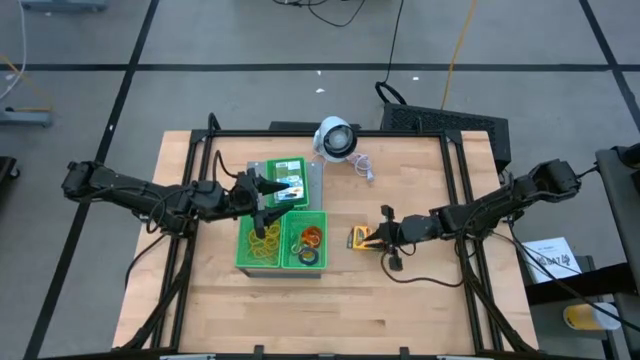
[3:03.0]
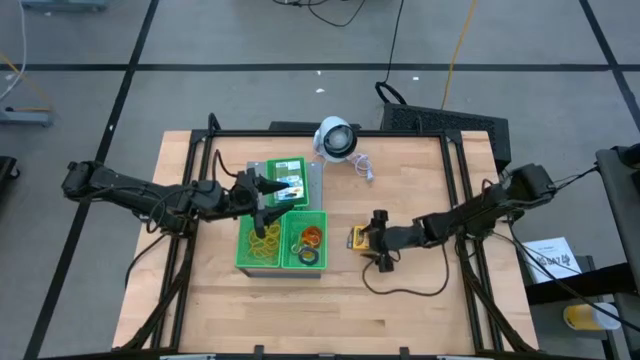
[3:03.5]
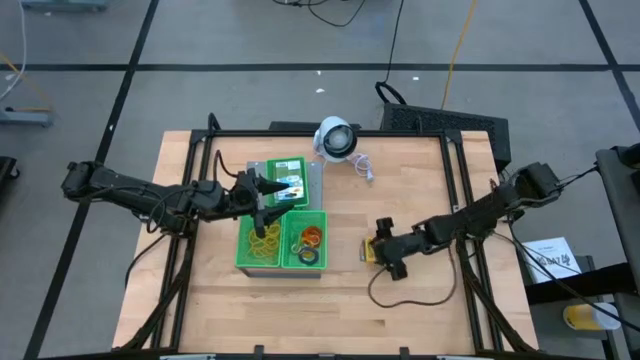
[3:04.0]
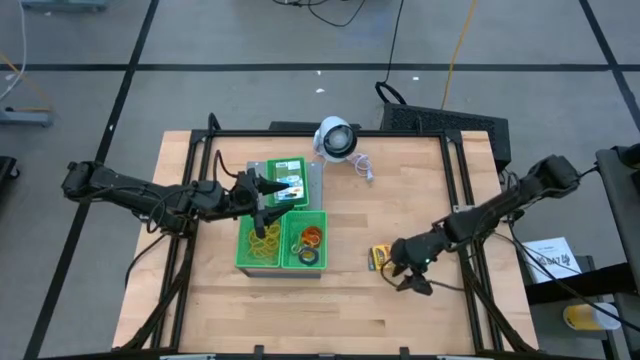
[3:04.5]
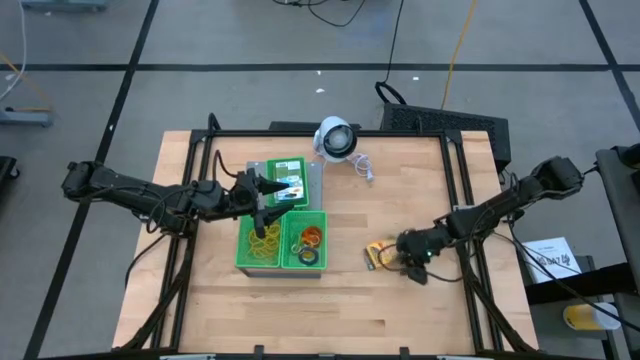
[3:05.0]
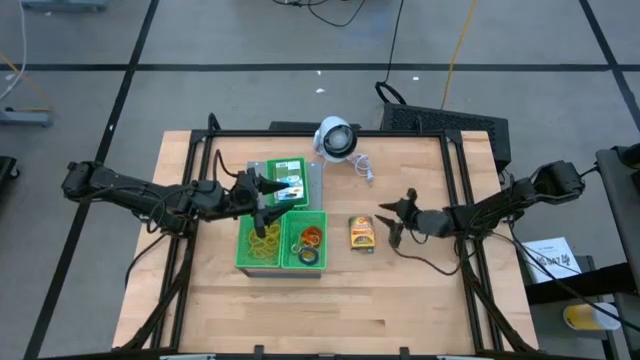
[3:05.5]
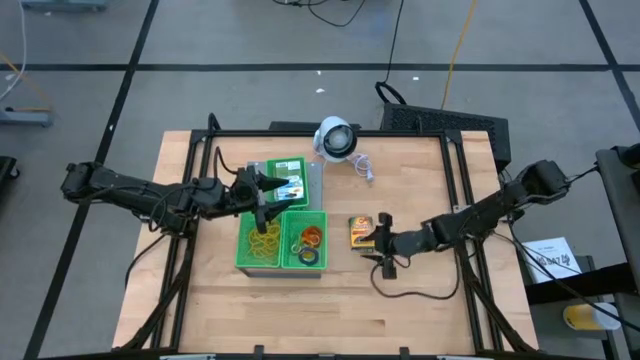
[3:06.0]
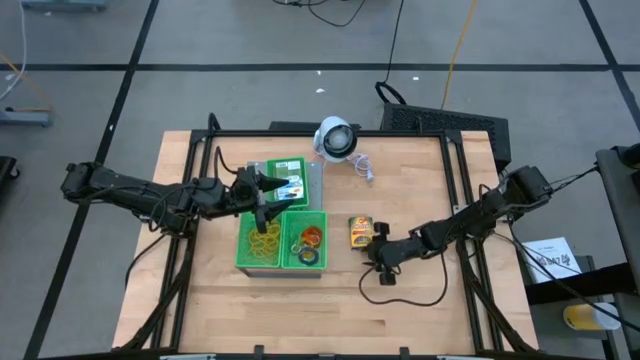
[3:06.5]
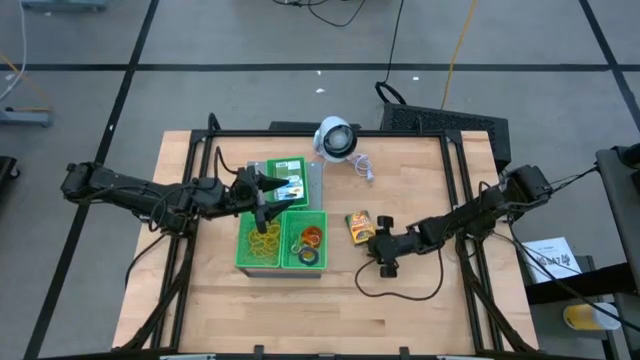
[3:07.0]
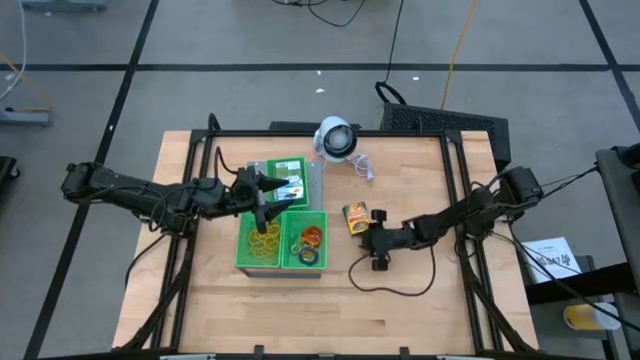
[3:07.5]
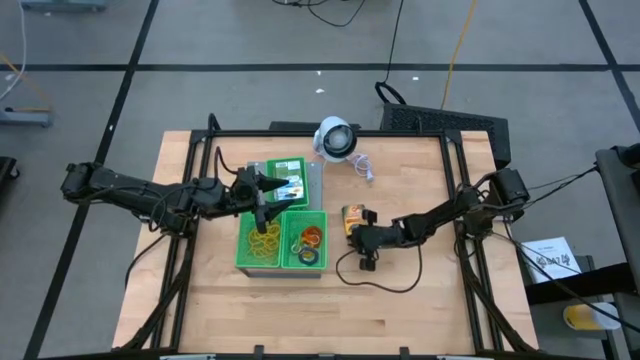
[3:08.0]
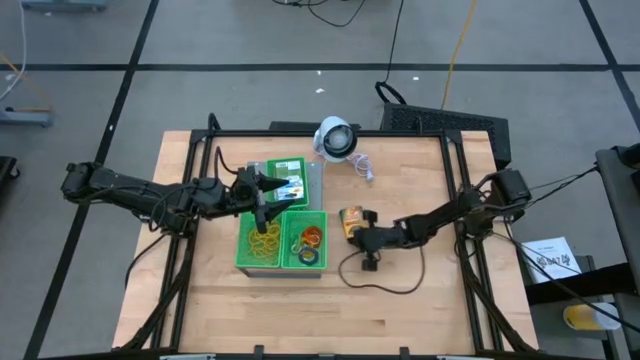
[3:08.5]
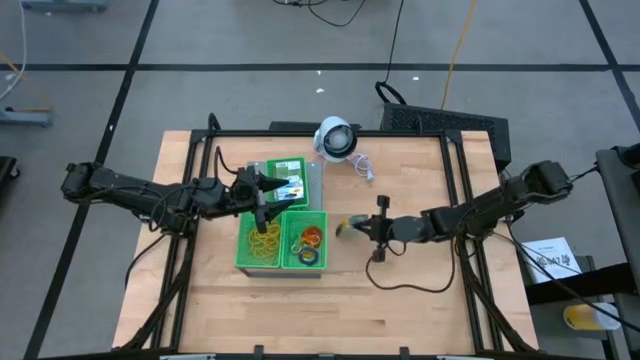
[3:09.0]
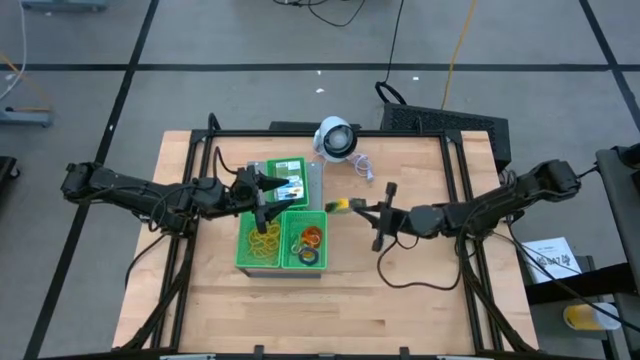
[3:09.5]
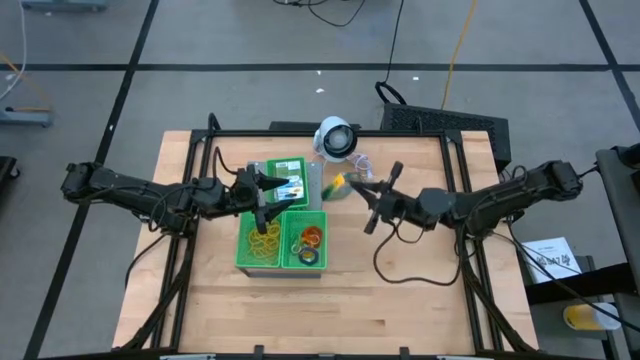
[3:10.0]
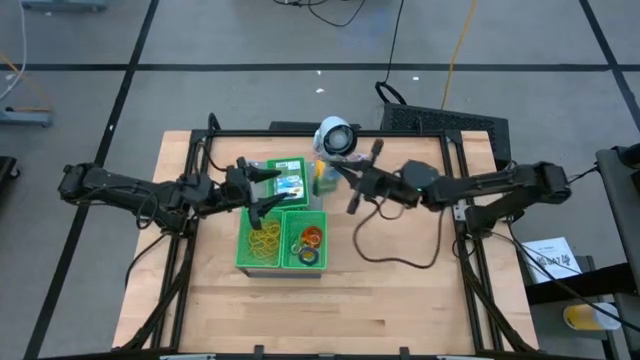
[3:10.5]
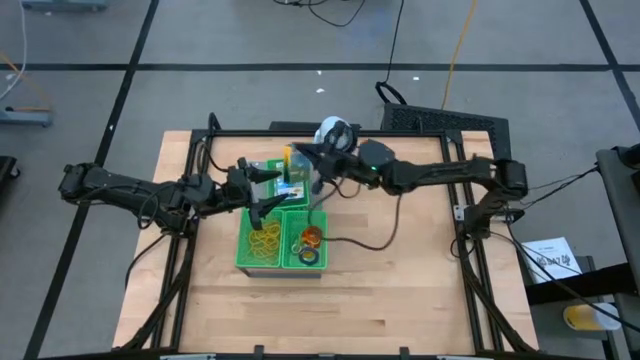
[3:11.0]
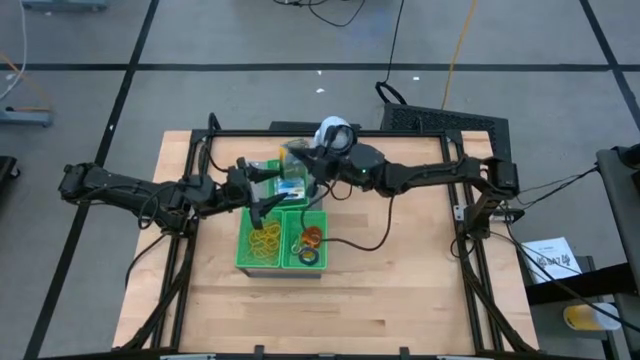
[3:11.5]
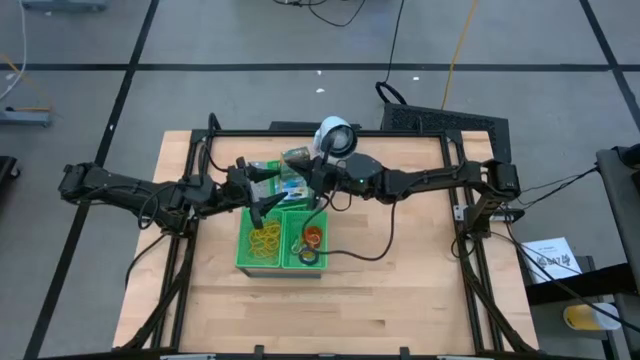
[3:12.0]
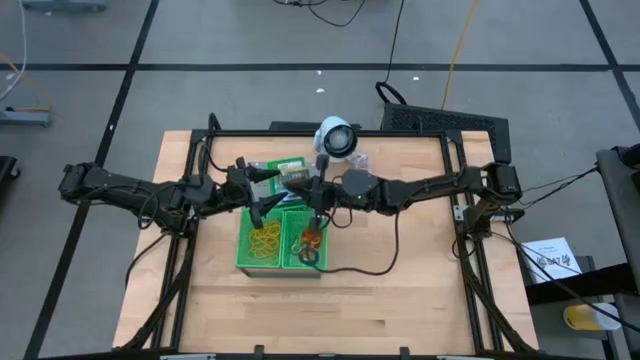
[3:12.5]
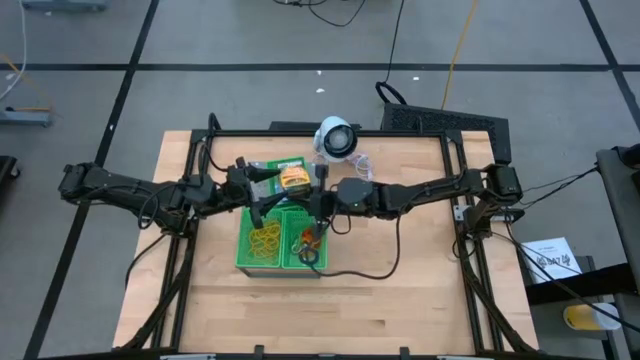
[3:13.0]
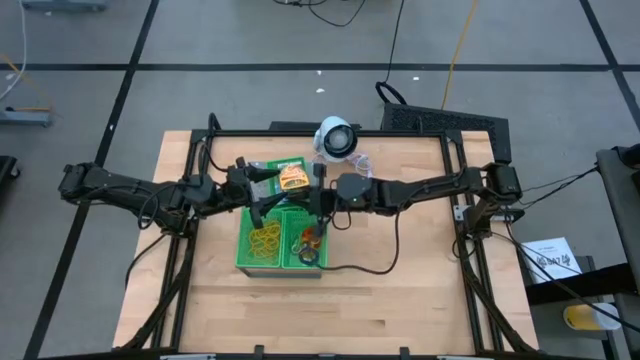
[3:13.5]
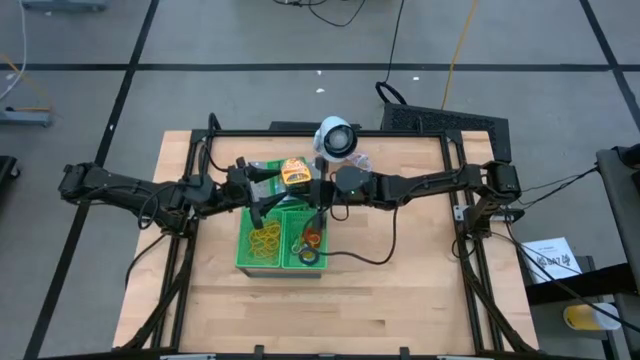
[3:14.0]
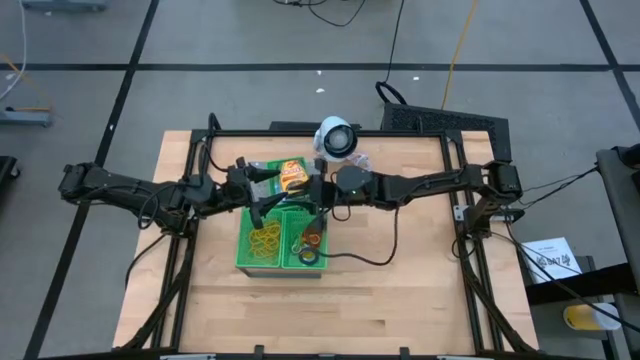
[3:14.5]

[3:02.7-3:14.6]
Task: Pick & Place Office Desk Supplies
Put the crayon box into the top green basket on the shelf

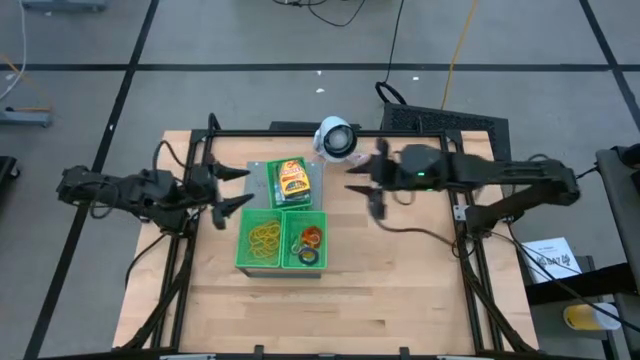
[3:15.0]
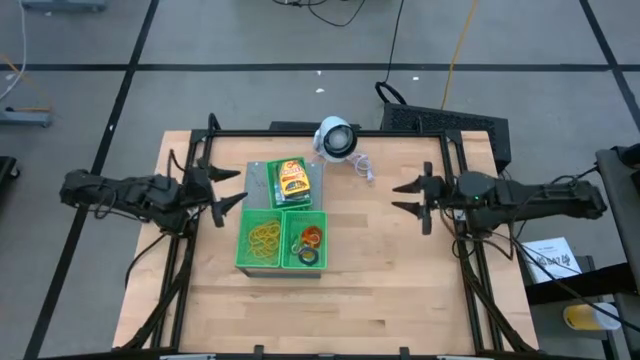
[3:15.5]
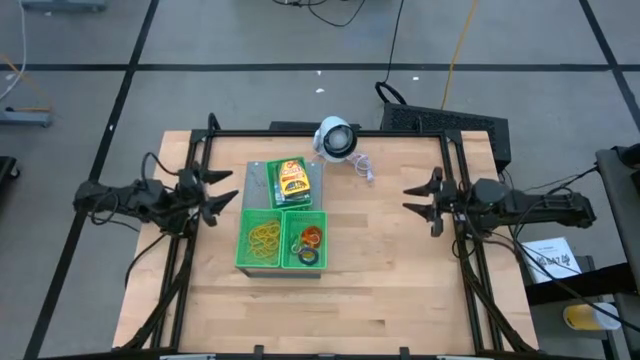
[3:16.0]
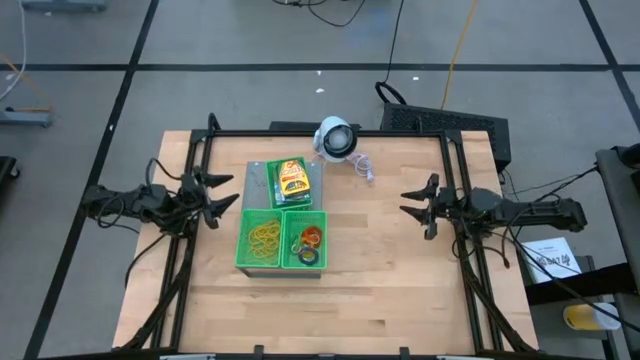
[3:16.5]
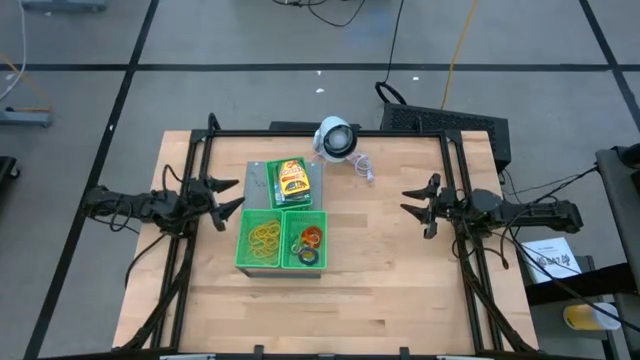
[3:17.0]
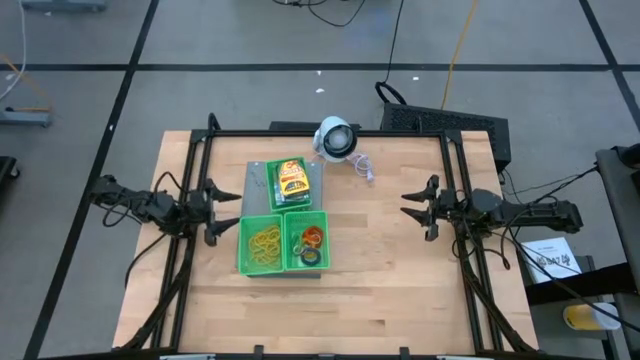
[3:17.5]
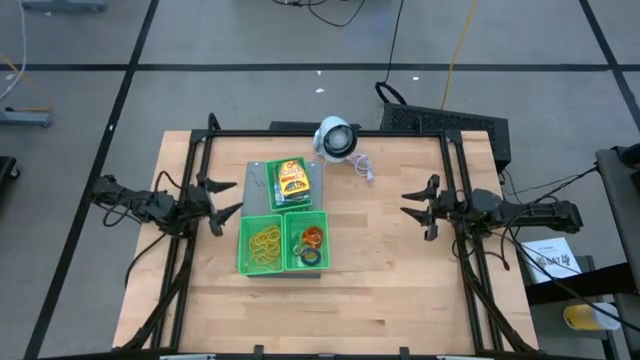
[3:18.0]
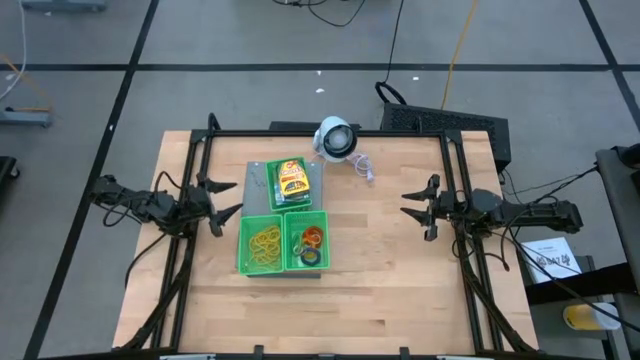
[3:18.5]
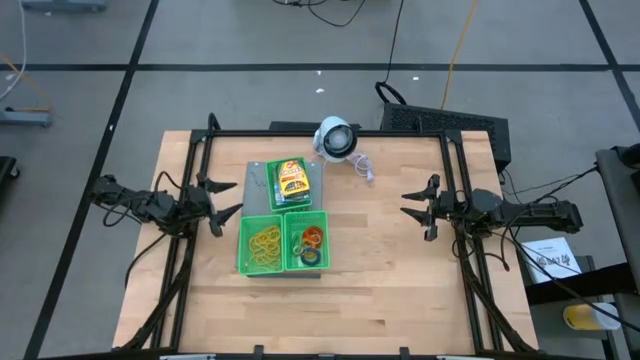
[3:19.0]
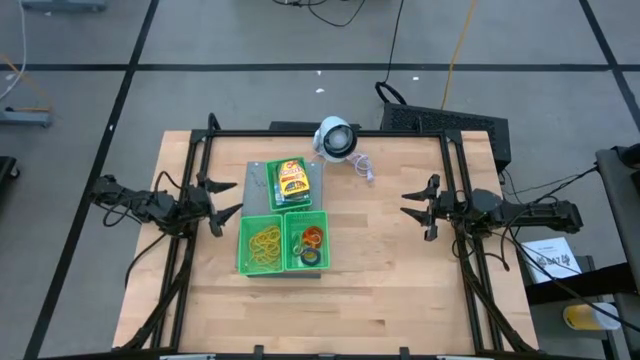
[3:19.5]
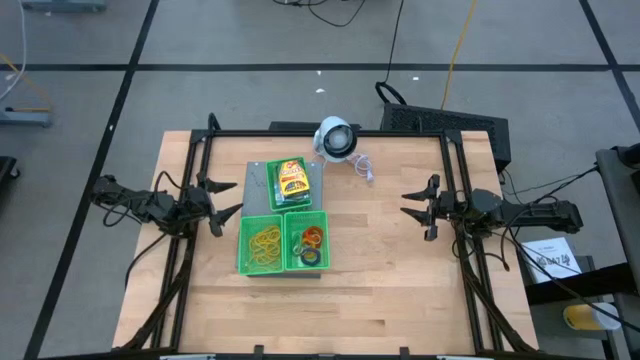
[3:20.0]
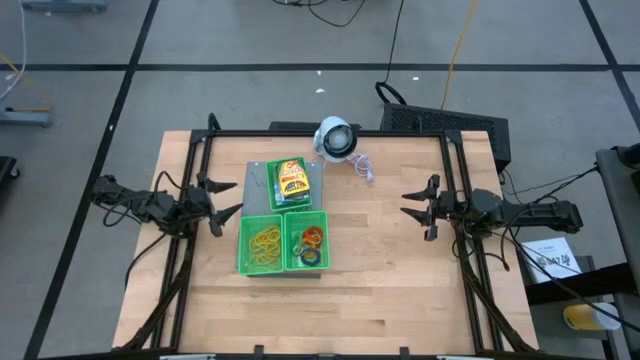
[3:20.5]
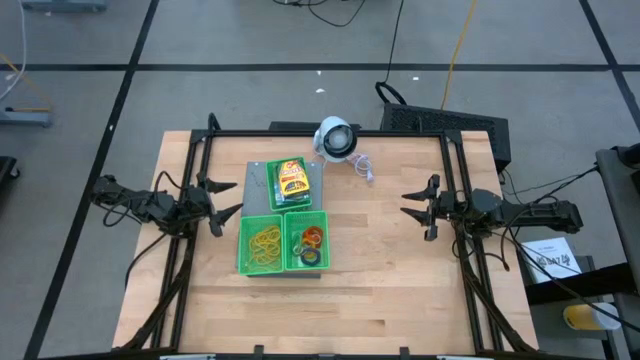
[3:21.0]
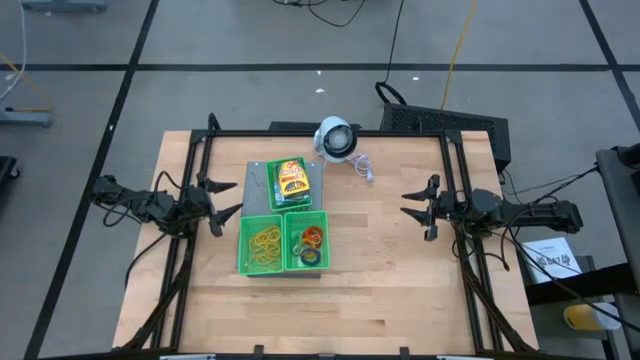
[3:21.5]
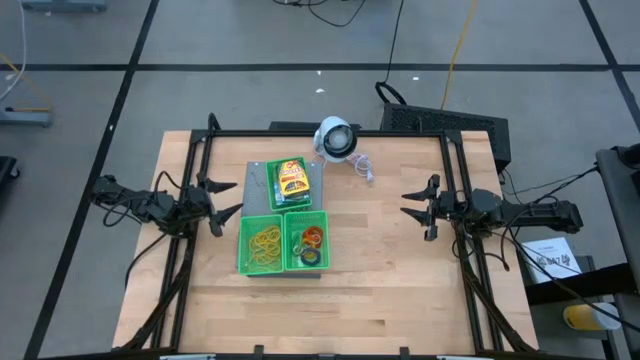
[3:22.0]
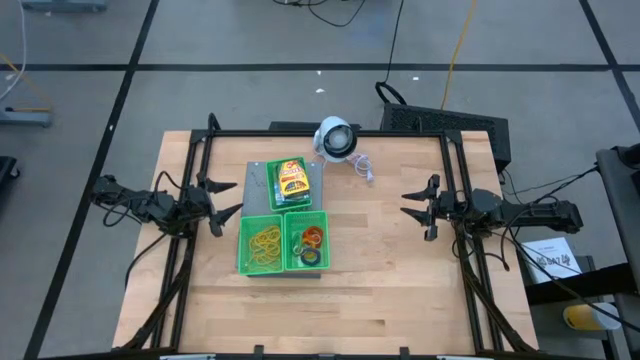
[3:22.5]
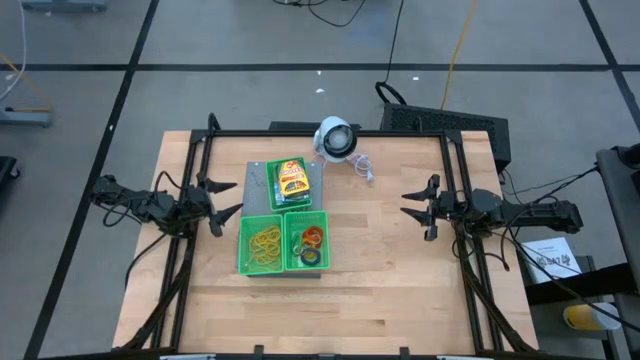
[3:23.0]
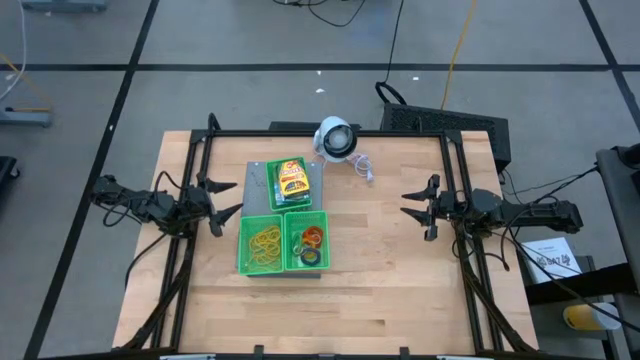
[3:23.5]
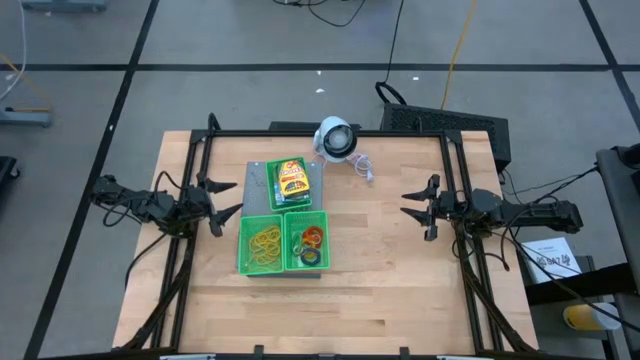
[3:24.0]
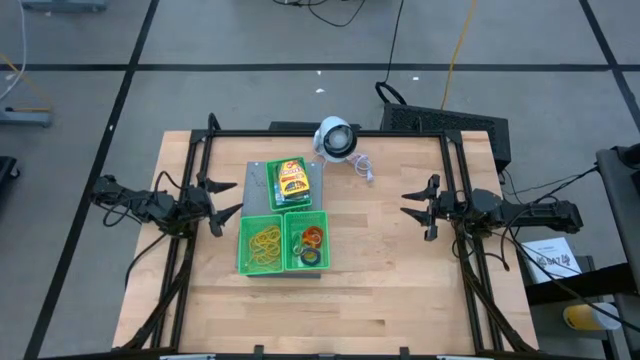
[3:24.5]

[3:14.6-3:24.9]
Return to Home Position
